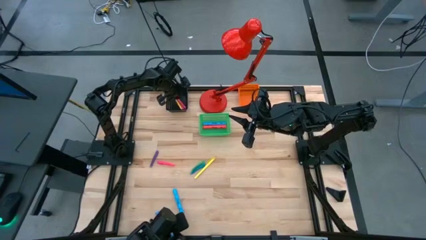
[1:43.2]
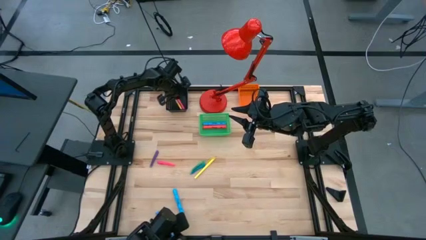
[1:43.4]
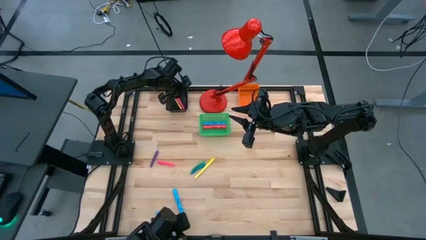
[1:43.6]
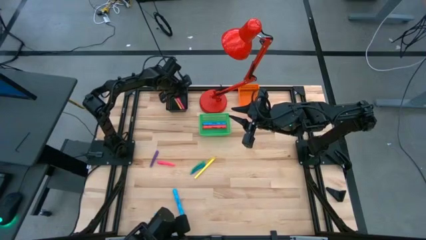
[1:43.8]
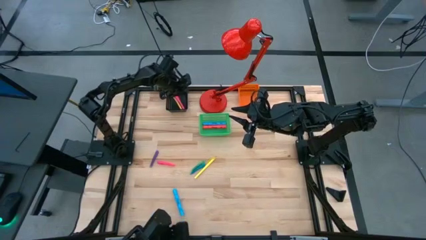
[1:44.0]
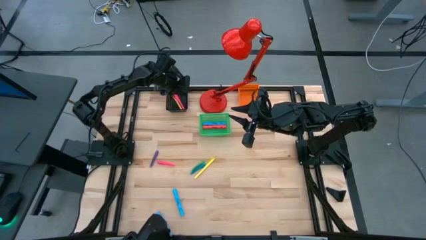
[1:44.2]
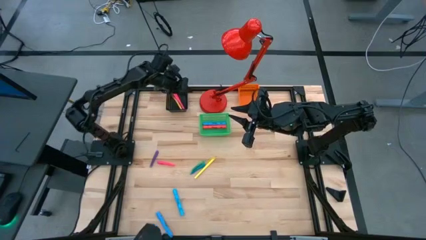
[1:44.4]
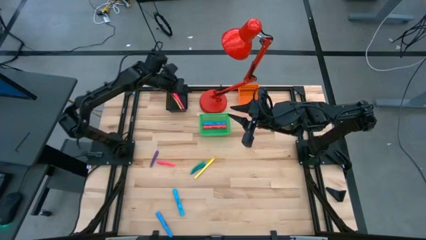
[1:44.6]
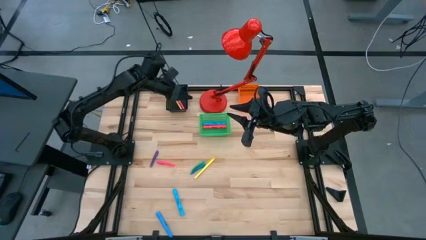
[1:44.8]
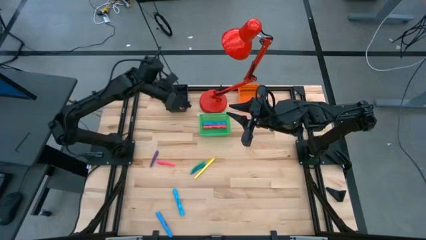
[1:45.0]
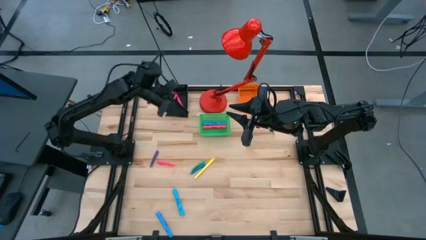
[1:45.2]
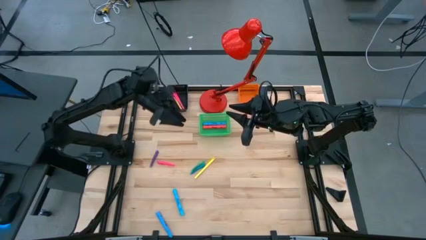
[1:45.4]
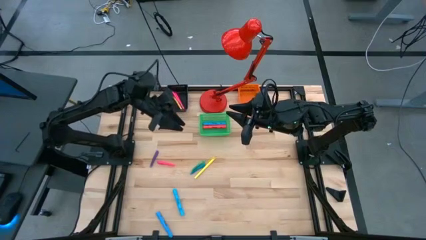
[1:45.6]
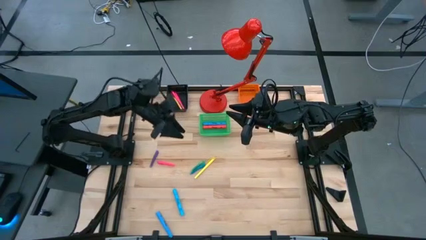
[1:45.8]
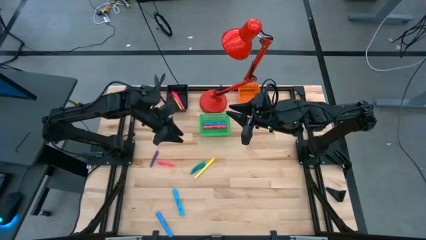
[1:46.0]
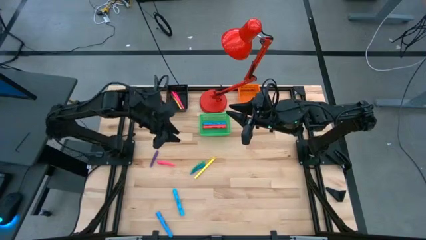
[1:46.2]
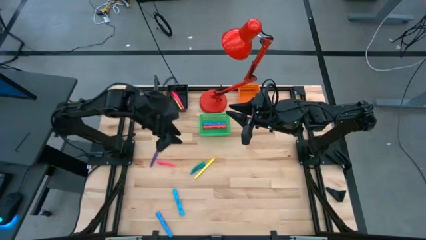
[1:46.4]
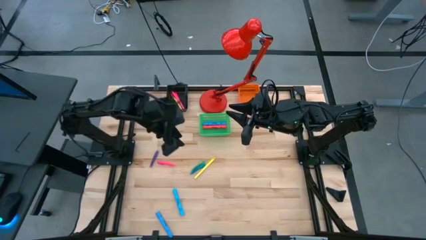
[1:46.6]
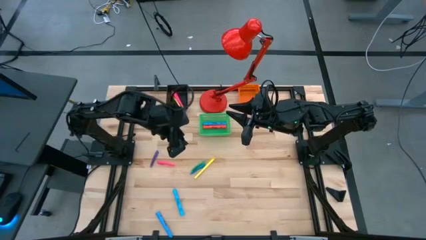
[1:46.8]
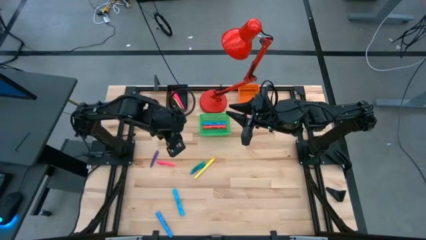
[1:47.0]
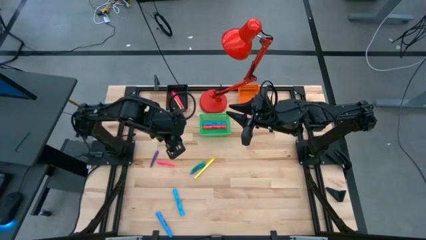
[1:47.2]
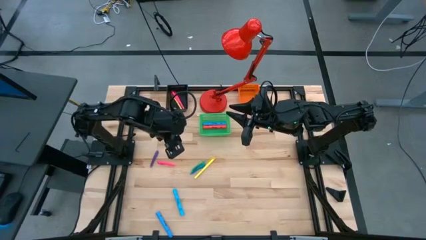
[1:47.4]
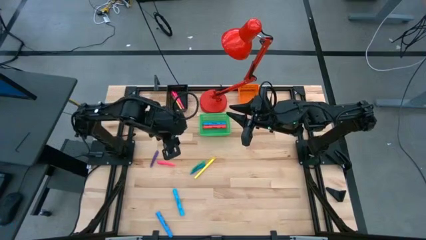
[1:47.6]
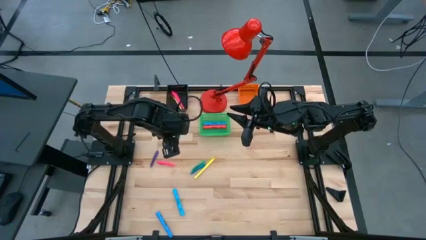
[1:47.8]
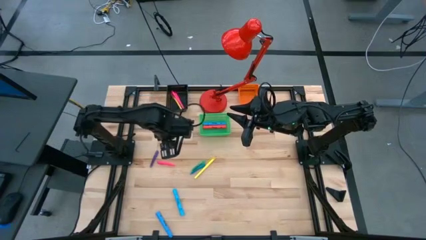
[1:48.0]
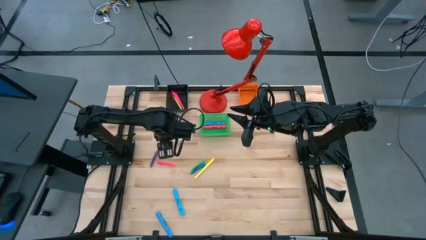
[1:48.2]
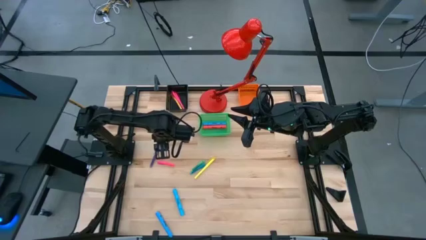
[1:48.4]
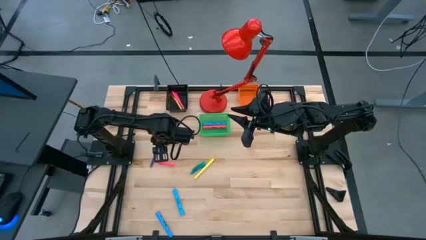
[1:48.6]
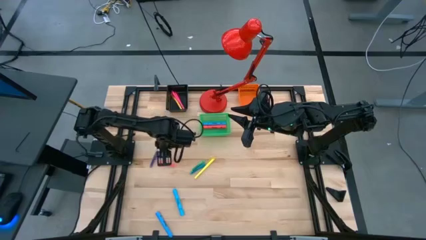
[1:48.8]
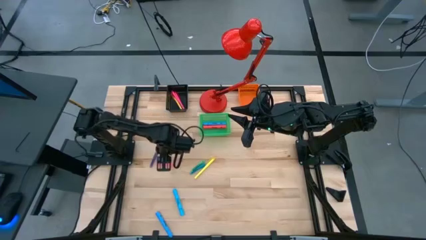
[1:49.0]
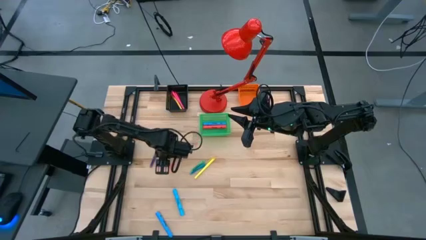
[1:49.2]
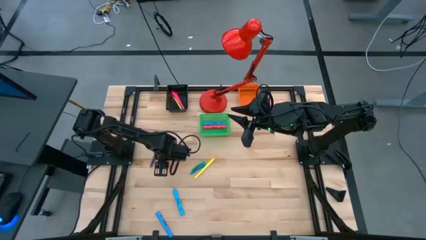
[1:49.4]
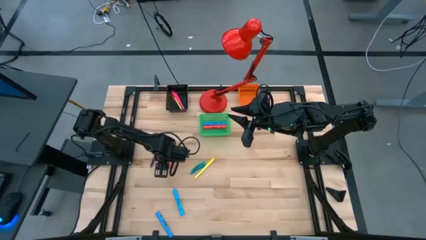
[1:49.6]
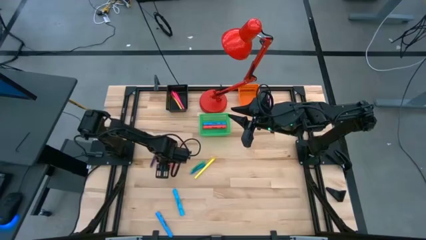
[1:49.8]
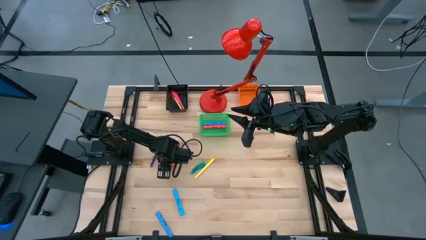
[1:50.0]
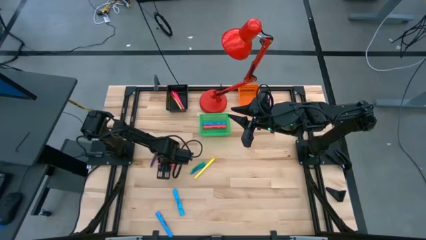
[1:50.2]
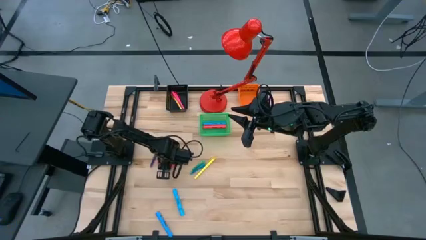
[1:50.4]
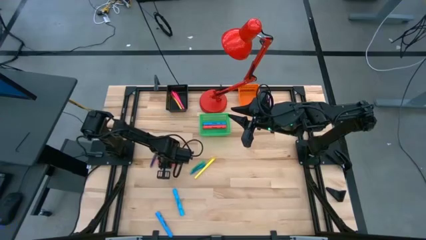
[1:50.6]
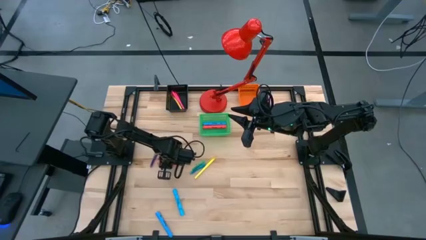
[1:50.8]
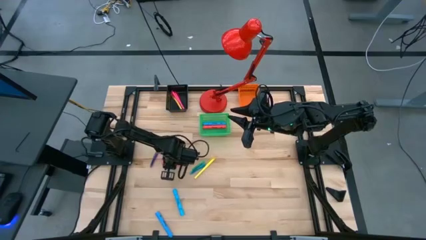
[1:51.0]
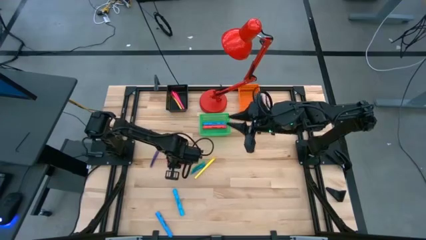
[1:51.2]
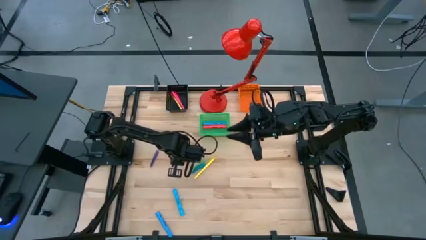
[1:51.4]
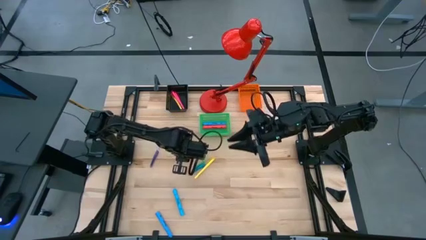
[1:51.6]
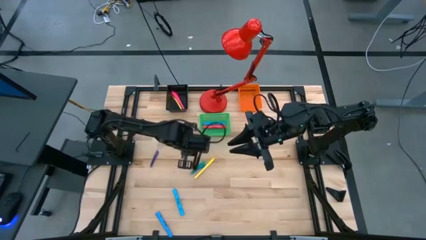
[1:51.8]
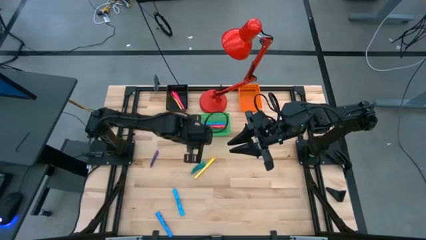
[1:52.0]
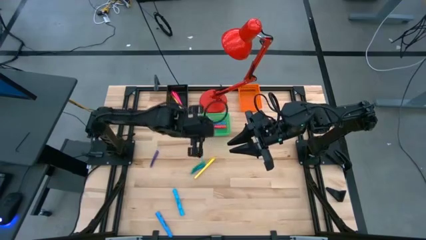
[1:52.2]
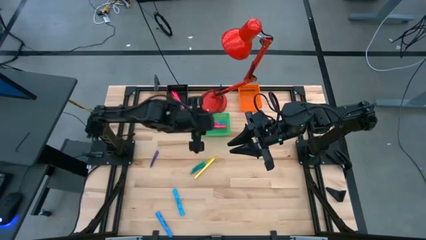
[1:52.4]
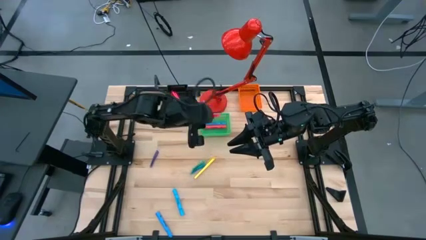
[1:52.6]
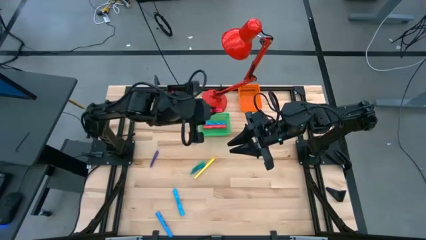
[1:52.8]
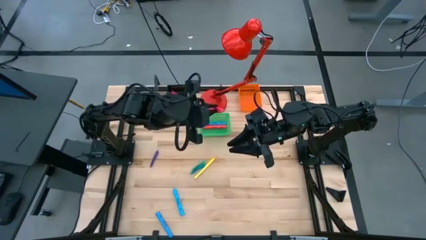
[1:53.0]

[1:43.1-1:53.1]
Task: Pick & Place Markers
Put the small pink highlighter into the orange basket

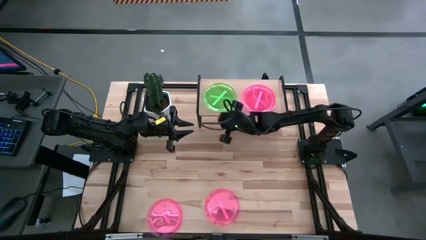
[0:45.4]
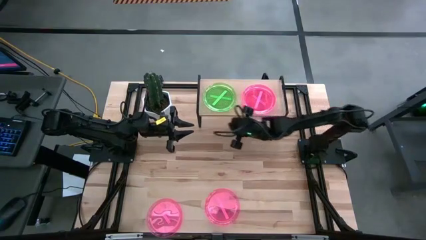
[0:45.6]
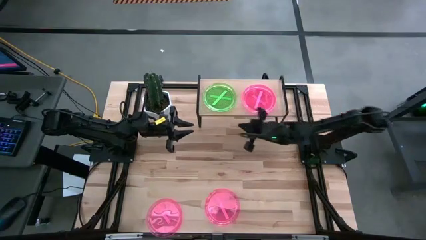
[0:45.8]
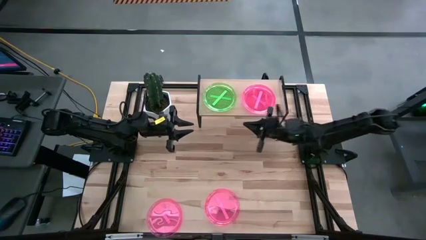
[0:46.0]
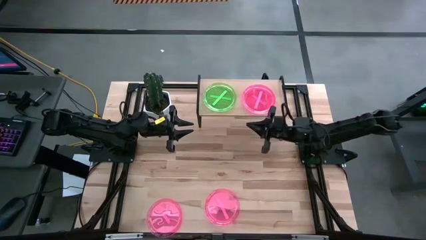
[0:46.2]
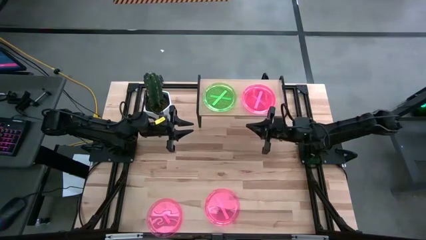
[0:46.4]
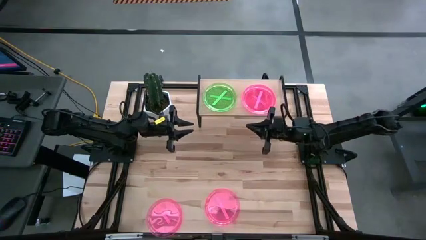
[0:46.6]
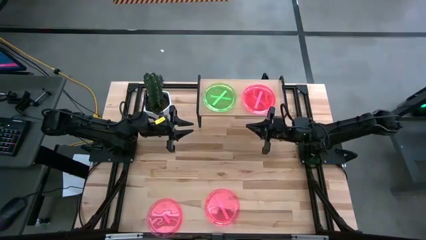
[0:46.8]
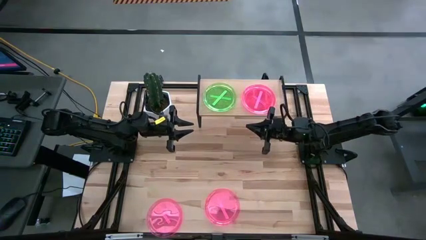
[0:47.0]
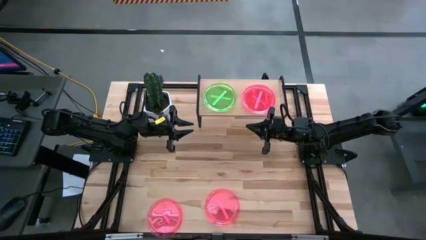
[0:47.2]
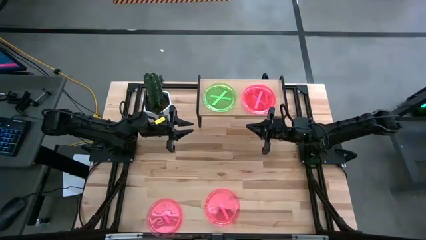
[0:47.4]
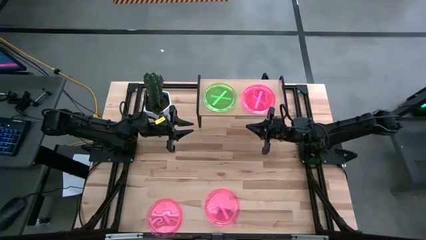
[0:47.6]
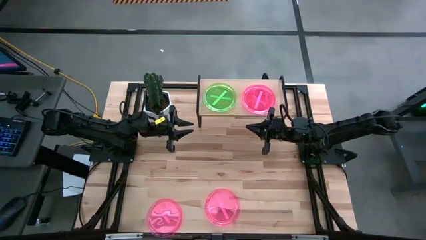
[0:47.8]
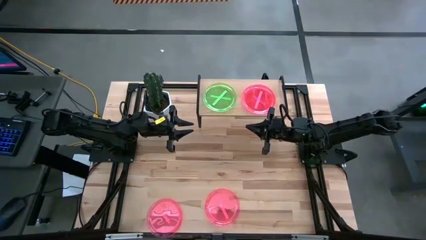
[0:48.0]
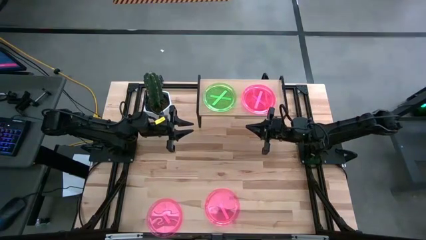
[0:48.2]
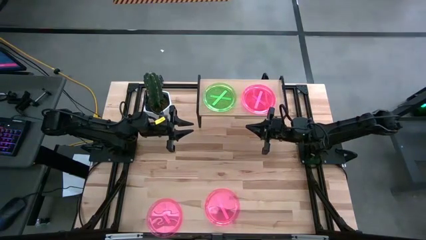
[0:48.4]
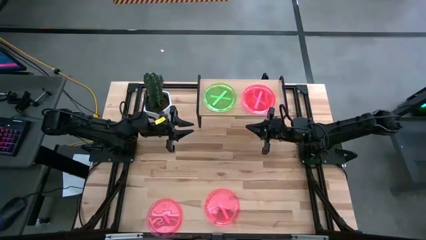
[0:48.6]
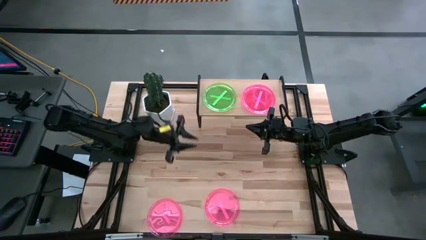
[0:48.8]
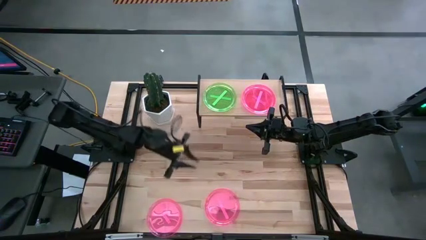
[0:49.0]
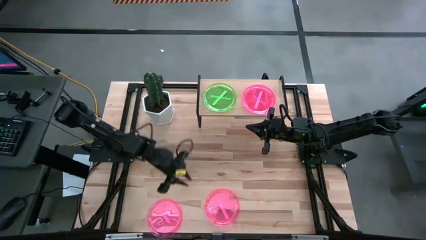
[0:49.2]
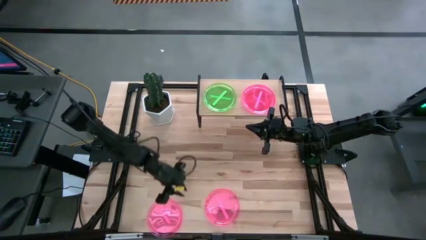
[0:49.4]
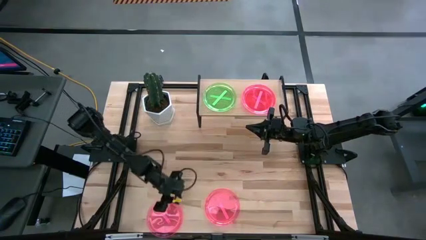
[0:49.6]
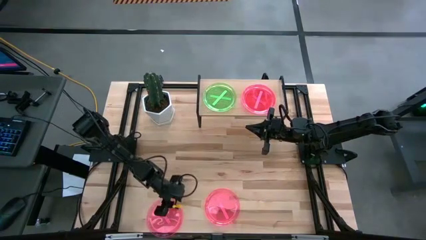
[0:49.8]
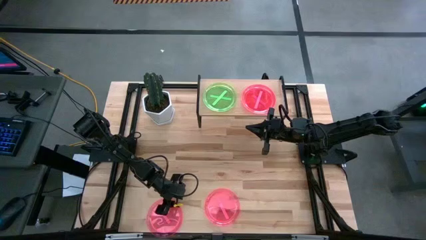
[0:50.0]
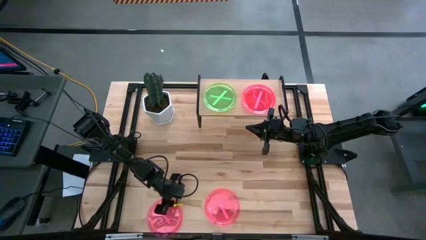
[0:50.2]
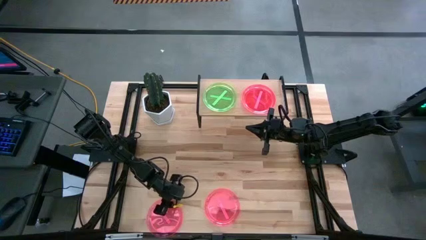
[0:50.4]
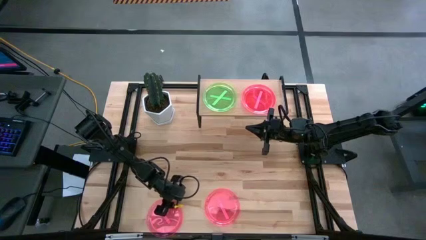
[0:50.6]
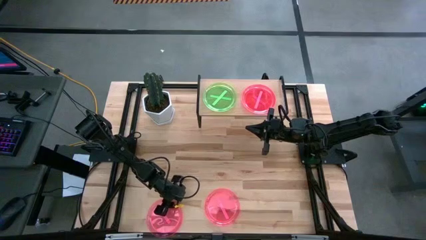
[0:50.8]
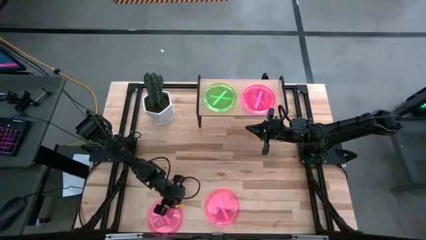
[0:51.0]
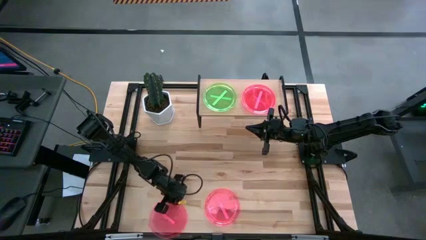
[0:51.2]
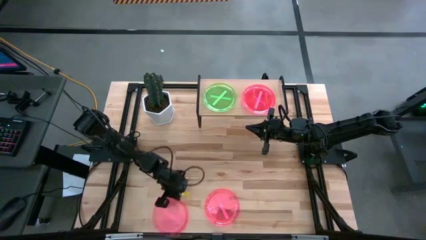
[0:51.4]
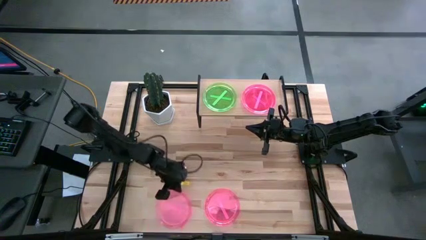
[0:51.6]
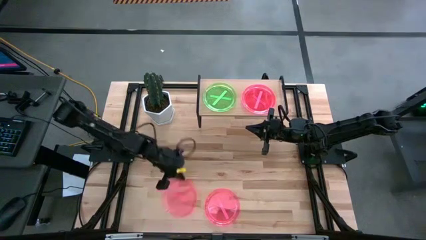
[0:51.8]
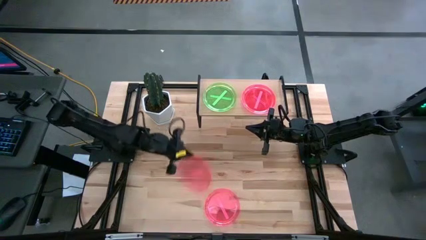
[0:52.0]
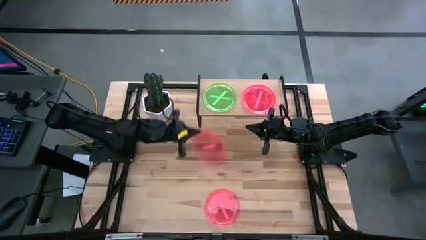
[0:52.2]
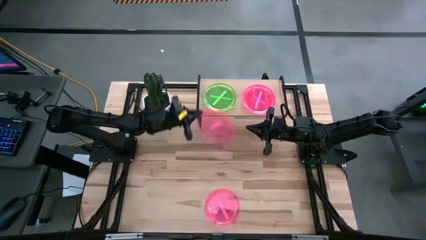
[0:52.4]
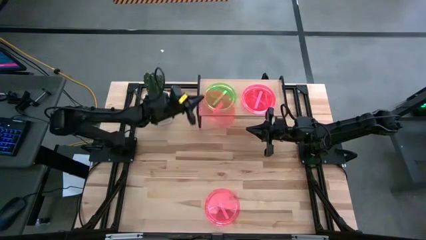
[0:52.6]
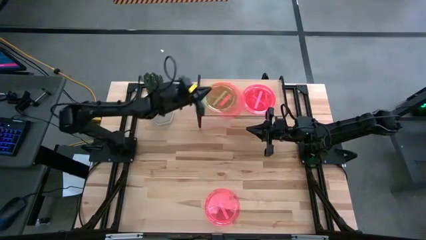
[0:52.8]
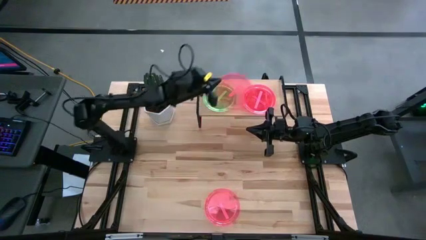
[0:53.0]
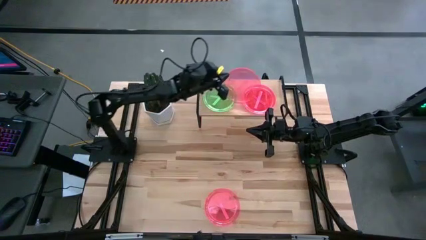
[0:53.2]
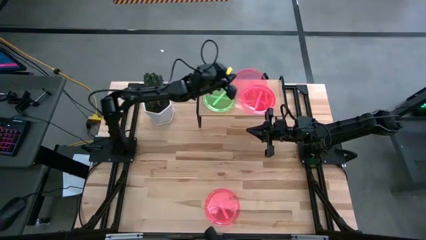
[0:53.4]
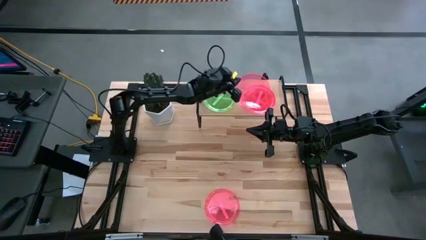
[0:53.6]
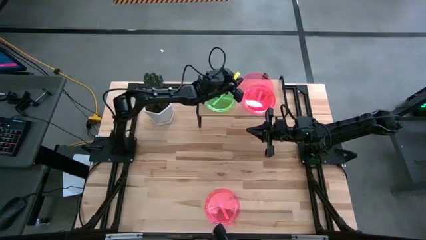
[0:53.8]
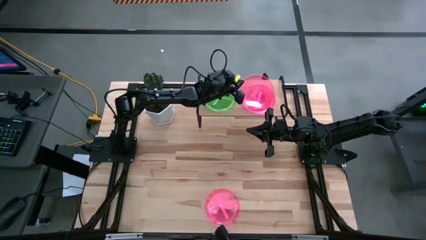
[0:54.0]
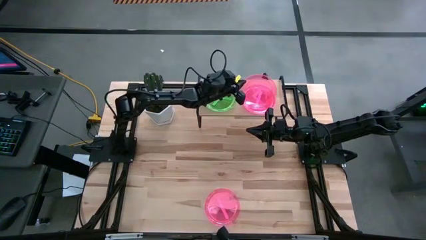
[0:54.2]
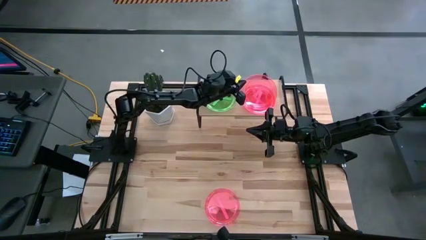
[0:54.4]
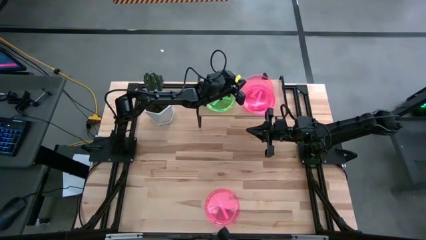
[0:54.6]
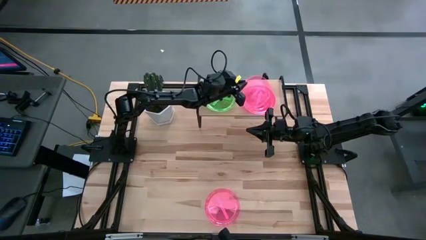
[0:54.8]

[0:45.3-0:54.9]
Task: Place and stack plates onto a shelf
Stack the pink plate on top of the pink plate on the shelf
